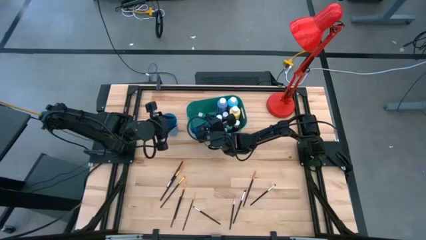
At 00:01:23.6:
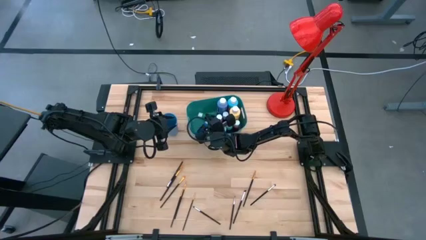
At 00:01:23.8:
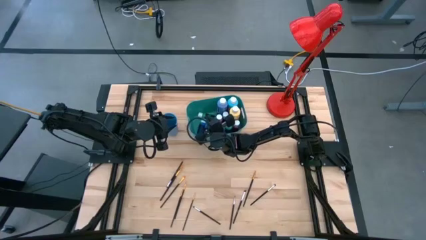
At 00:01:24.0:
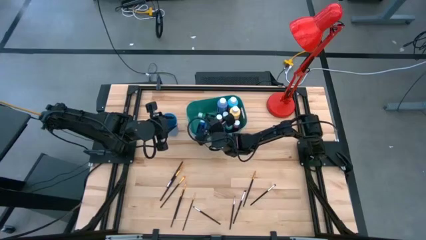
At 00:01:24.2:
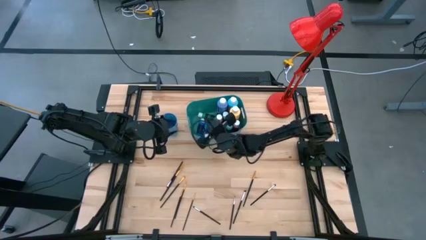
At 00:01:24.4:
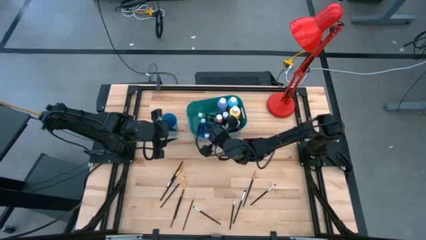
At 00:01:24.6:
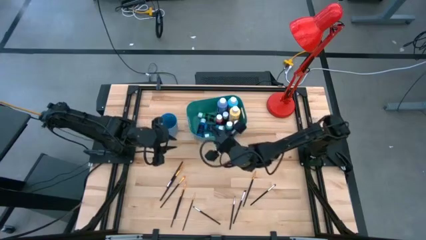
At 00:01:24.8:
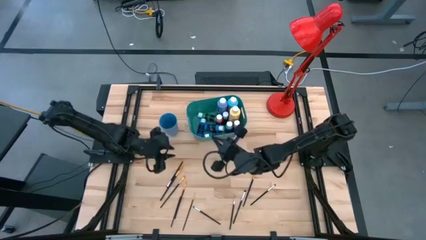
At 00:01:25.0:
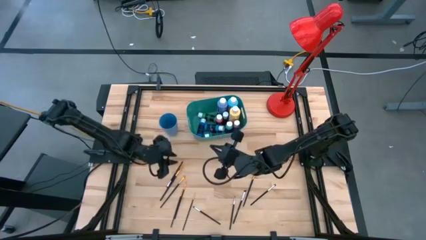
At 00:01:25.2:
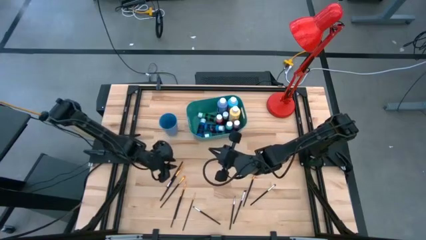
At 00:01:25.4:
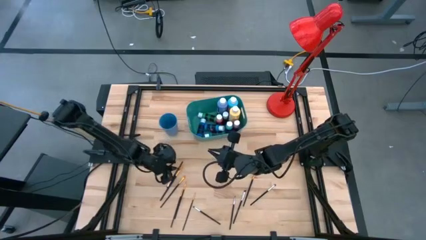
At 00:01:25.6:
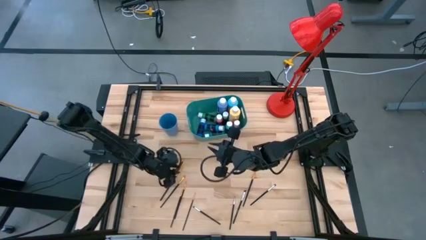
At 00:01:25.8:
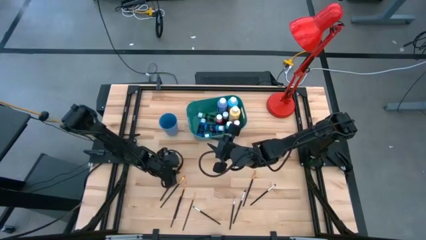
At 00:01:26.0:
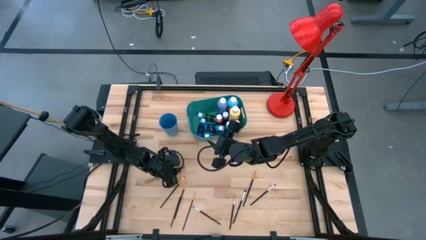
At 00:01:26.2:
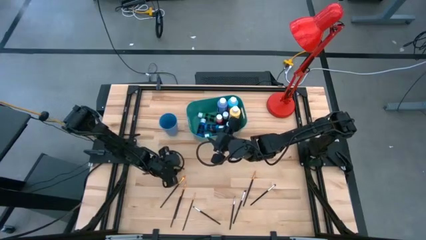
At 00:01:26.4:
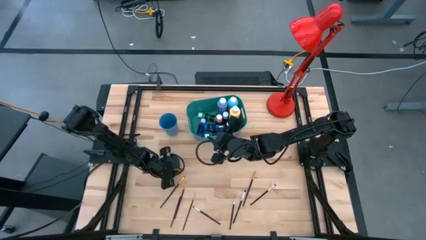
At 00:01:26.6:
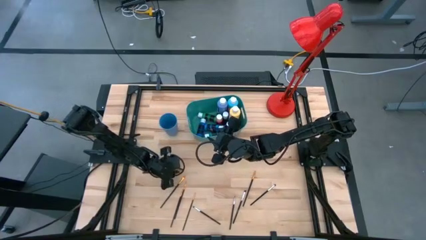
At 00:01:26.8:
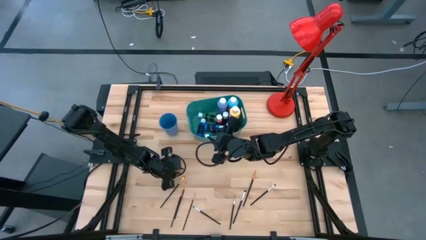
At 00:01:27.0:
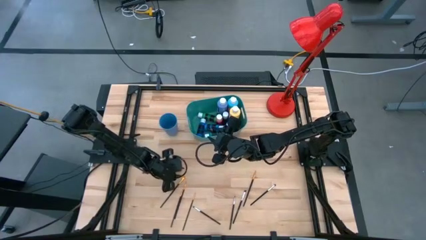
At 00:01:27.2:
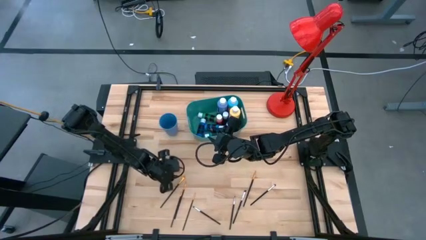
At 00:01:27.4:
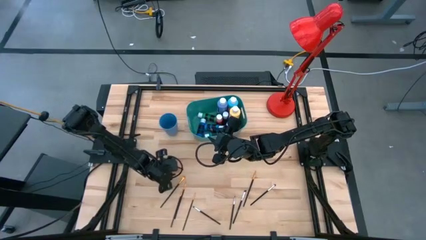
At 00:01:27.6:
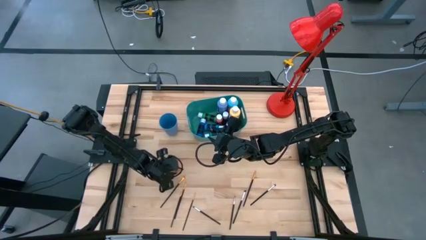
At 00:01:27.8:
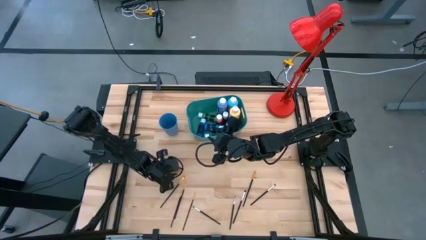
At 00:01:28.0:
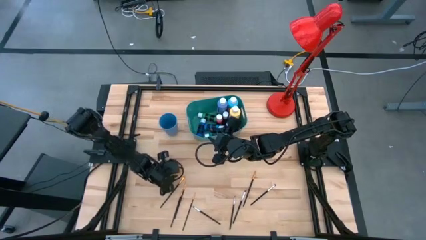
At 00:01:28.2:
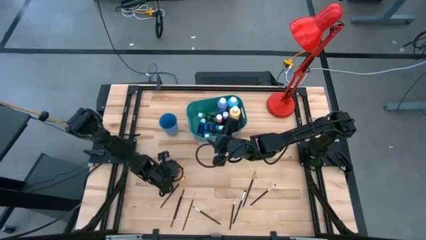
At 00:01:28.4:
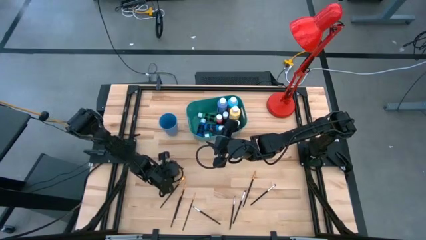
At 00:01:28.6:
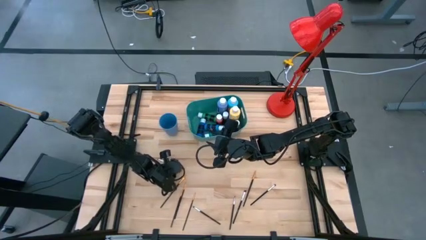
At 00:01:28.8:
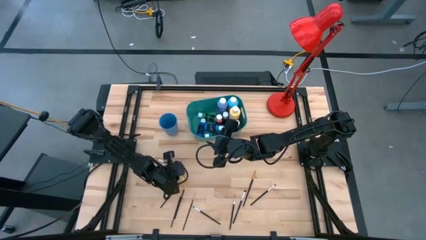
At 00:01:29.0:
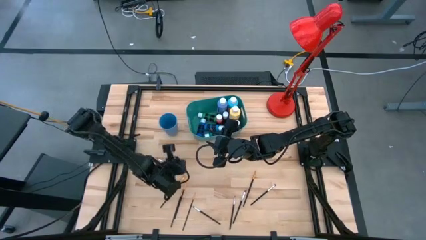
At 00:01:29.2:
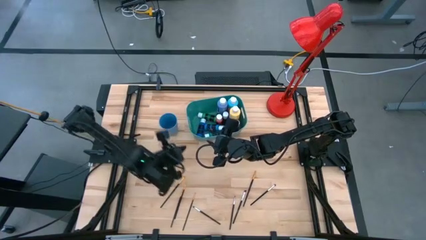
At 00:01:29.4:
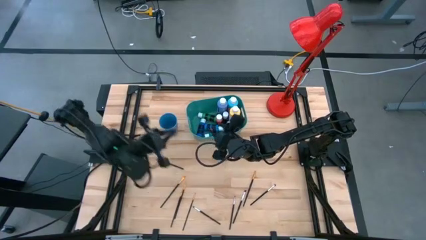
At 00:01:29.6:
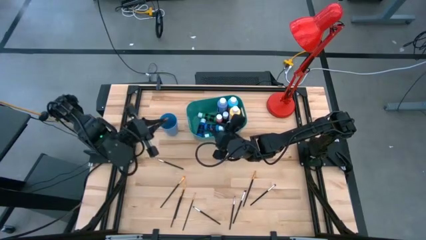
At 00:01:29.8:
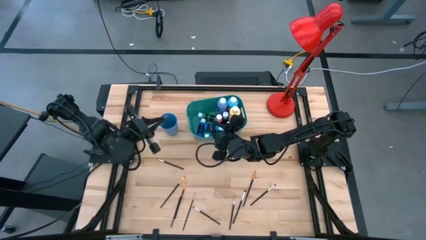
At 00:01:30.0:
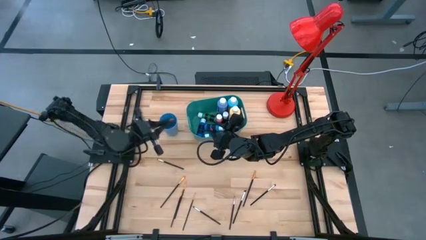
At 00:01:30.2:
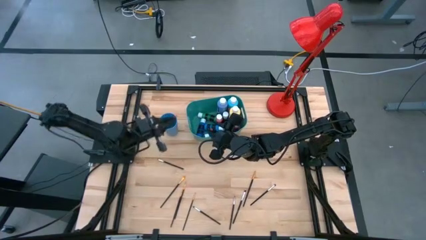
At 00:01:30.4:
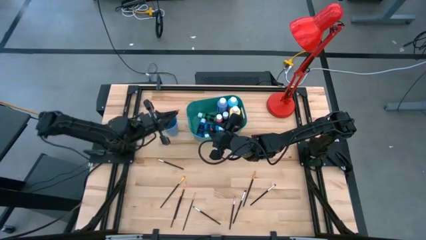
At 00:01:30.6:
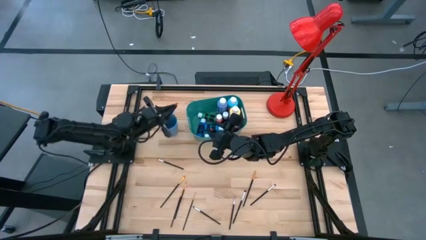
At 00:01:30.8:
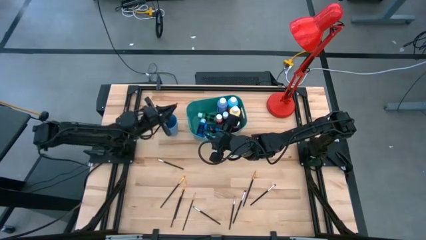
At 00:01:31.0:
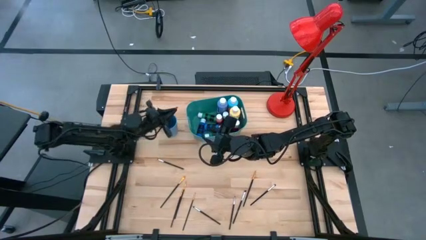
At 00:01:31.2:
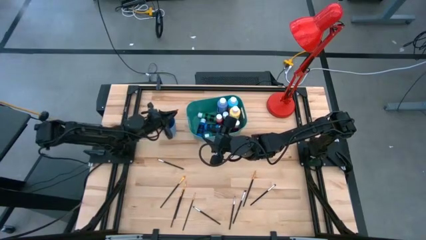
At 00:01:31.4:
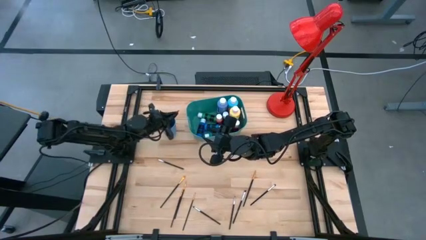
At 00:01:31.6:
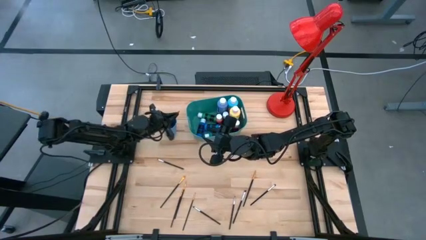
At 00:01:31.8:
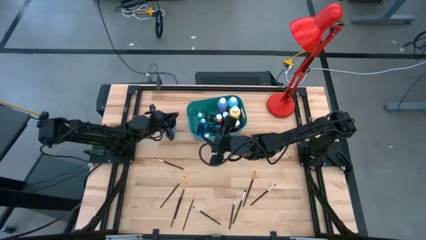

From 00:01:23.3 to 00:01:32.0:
Task: Pick & Place Paint Supplies
Put the gold paint brush into the blue cup

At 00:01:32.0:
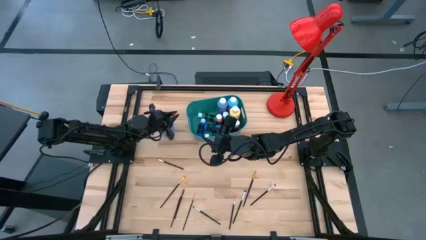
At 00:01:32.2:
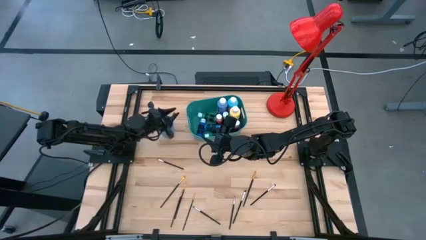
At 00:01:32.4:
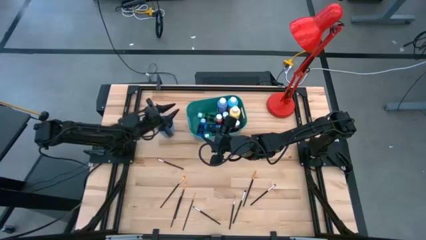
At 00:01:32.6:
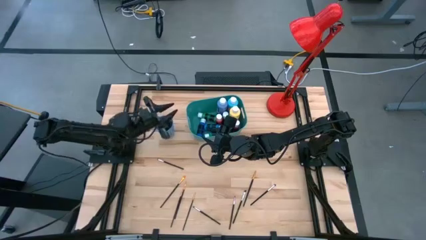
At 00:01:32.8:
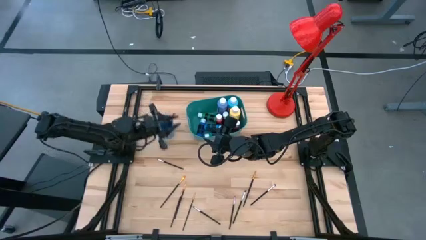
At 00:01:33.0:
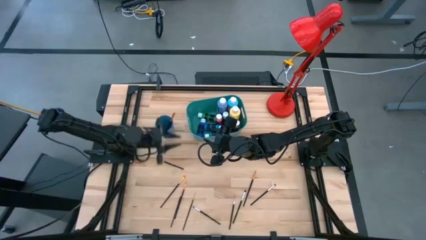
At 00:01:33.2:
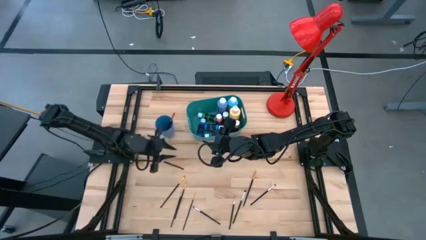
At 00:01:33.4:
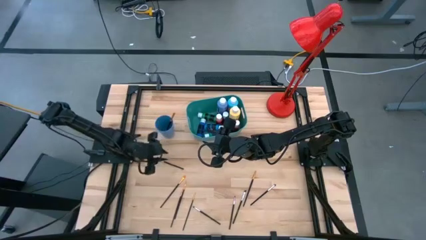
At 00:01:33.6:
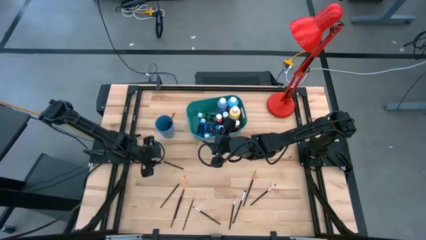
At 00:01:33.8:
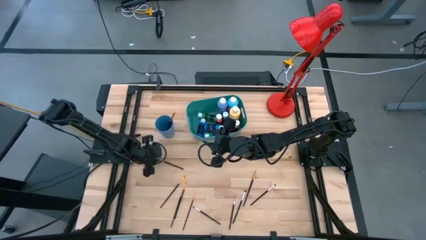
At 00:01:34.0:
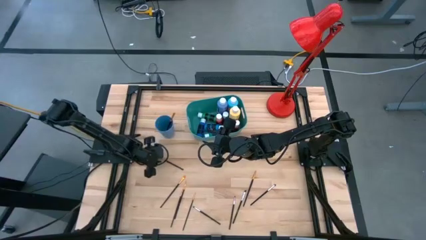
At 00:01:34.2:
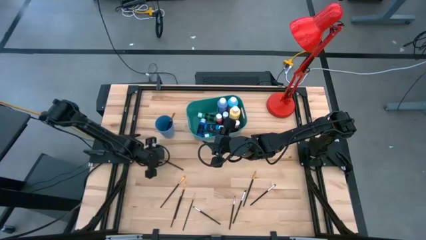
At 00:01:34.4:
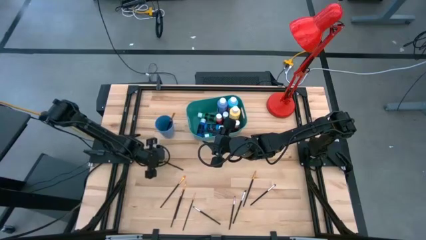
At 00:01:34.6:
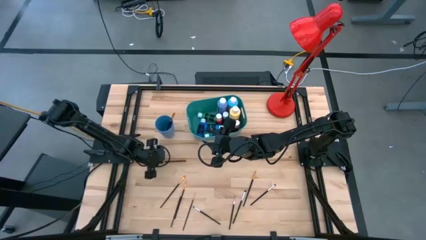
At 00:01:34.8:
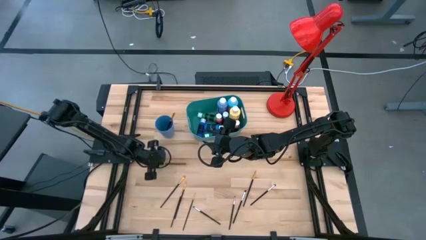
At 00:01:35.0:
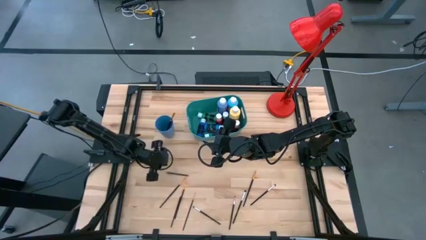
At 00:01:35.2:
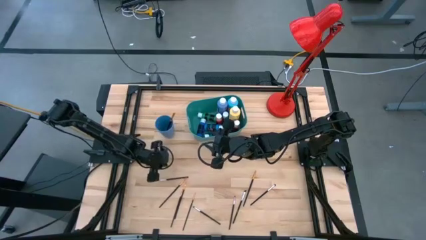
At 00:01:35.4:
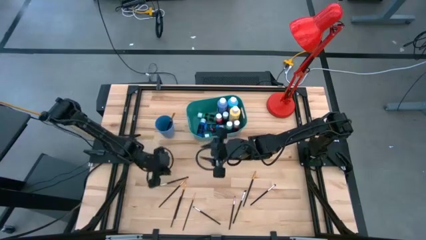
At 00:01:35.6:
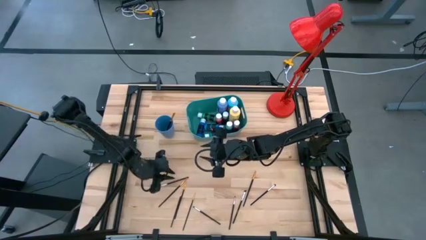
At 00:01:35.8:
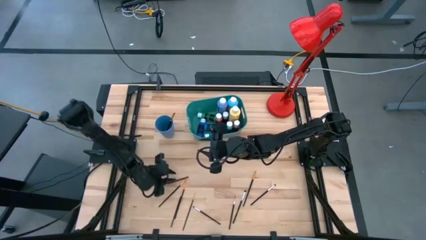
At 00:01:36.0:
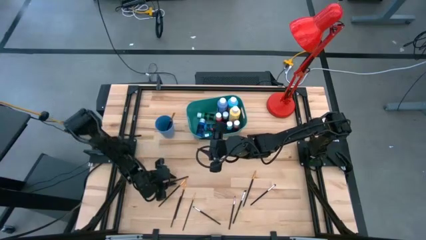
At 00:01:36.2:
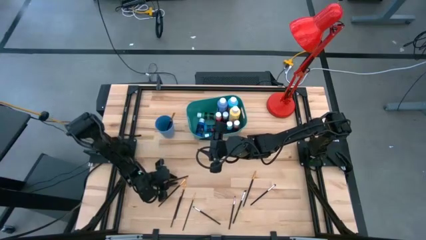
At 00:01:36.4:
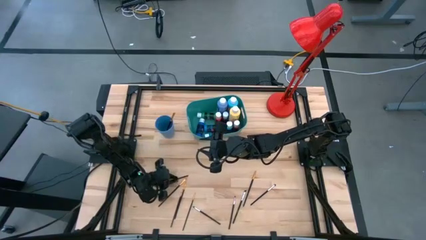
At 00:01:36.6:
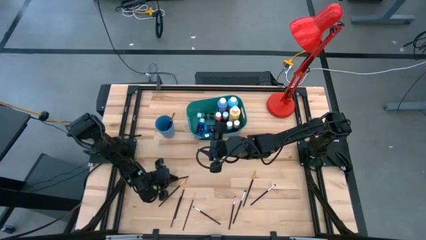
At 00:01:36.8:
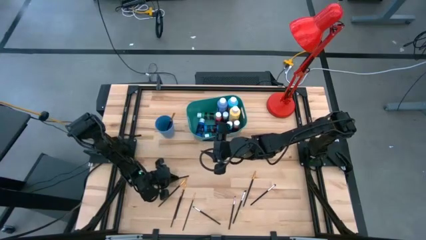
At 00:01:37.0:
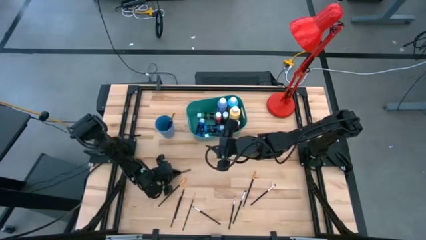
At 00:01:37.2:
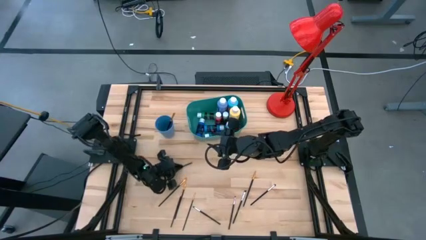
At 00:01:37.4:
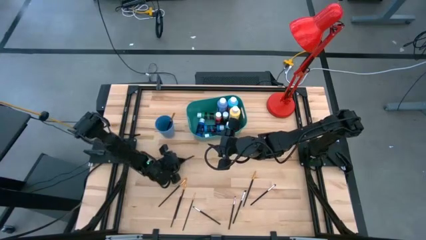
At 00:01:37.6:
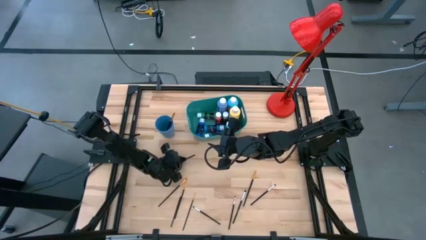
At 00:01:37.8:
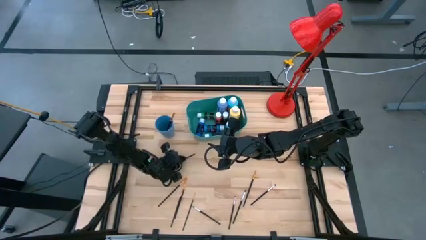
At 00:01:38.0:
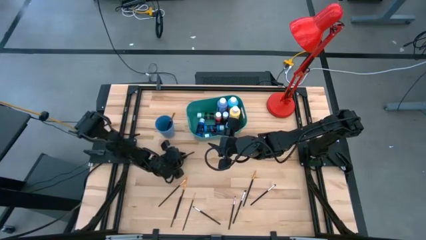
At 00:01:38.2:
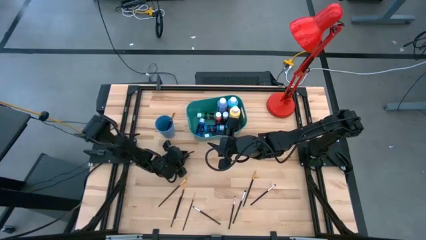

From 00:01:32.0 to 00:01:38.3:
Put the silver paint brush into the blue cup

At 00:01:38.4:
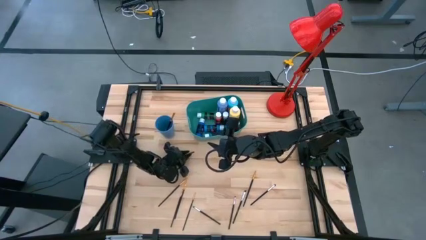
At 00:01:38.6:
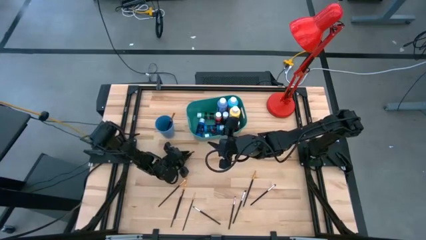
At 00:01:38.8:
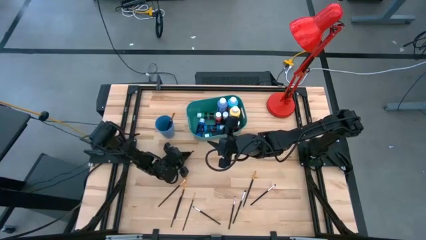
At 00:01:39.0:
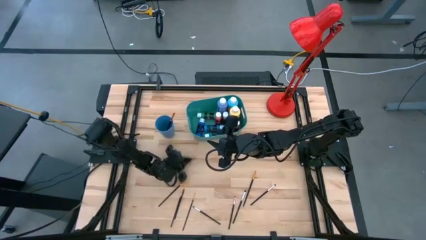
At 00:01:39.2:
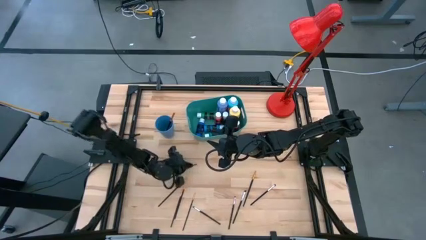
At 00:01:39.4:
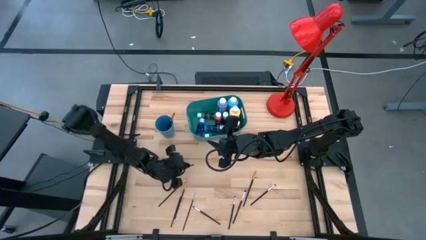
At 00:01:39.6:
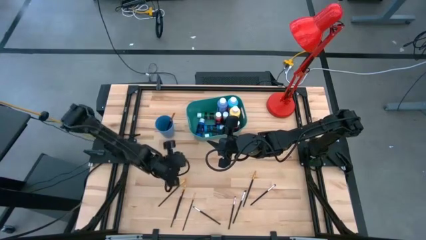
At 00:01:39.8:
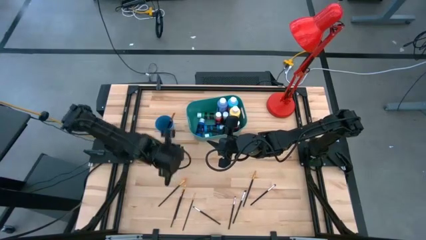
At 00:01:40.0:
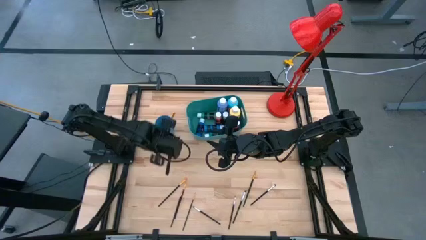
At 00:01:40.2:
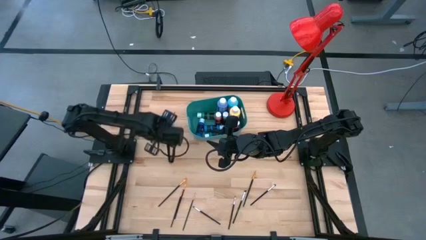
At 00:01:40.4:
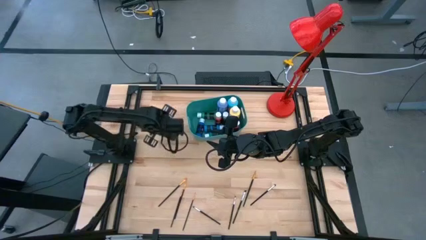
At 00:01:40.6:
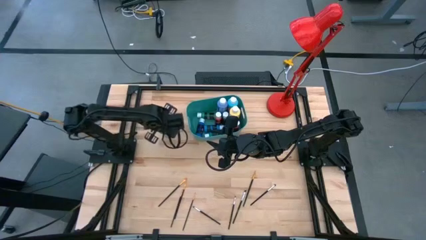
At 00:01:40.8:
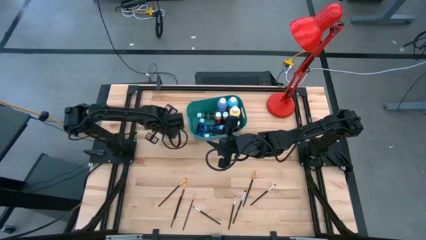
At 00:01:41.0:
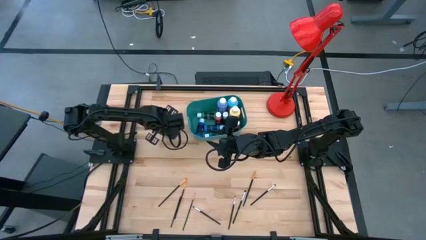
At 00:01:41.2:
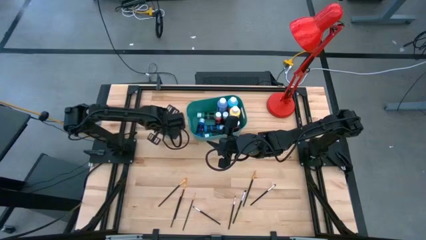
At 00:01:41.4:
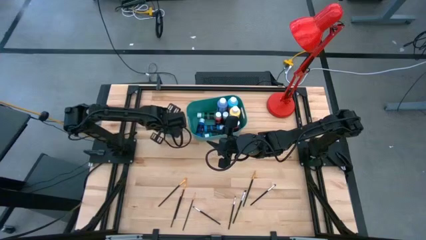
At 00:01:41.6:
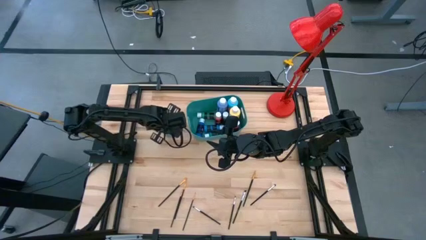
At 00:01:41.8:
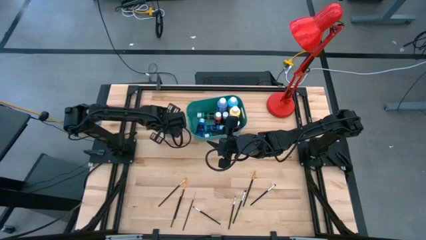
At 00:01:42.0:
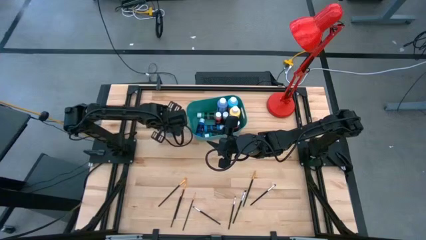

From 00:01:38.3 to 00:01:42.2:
Put the silver paint brush into the blue cup
